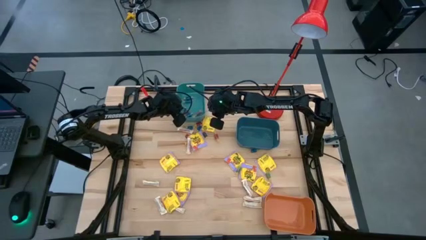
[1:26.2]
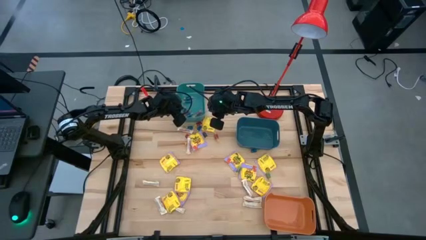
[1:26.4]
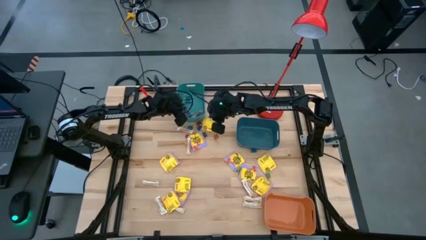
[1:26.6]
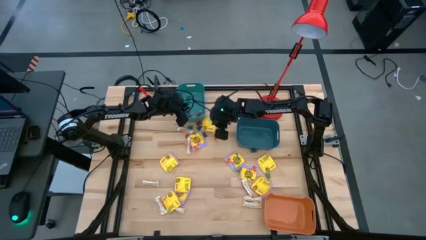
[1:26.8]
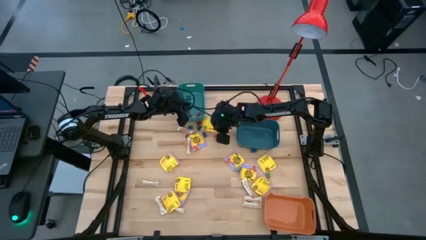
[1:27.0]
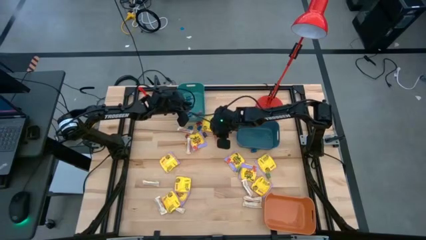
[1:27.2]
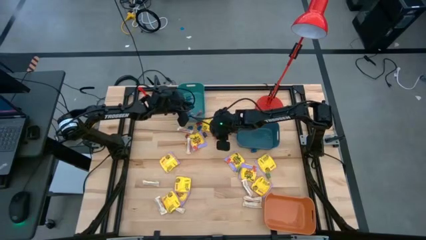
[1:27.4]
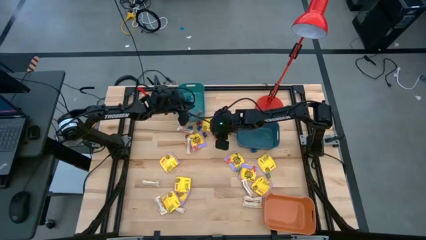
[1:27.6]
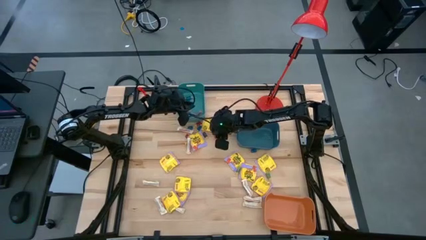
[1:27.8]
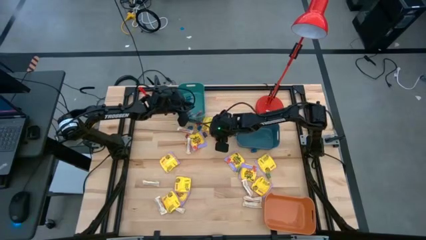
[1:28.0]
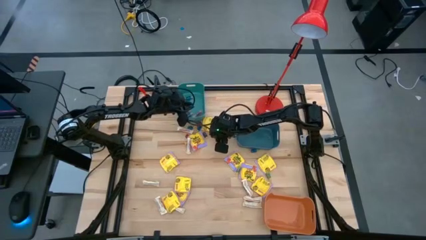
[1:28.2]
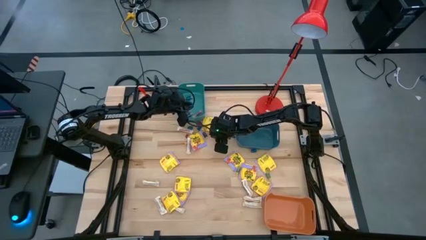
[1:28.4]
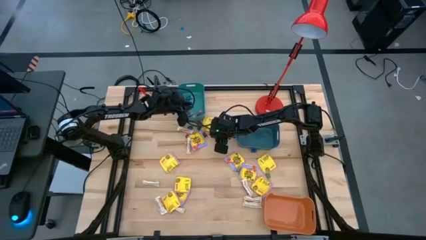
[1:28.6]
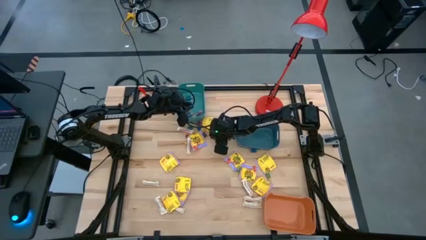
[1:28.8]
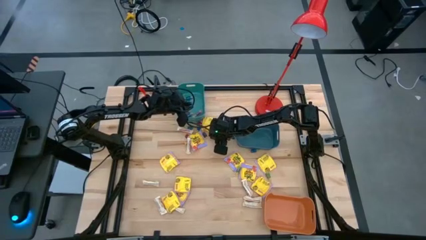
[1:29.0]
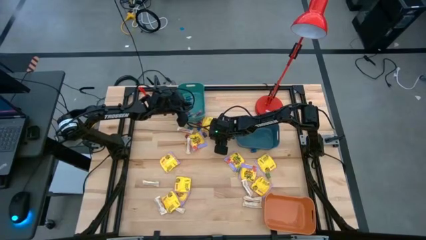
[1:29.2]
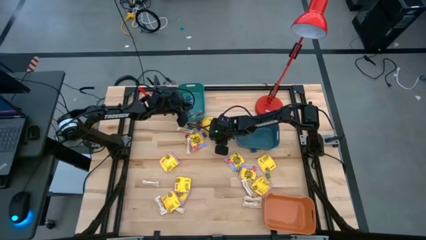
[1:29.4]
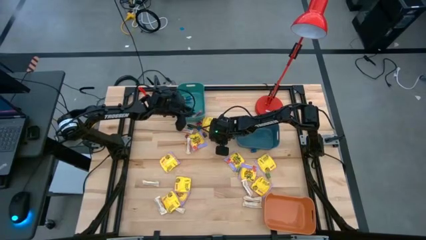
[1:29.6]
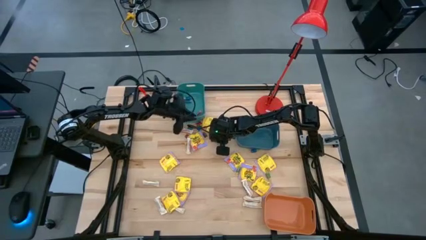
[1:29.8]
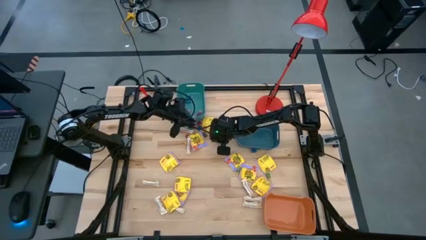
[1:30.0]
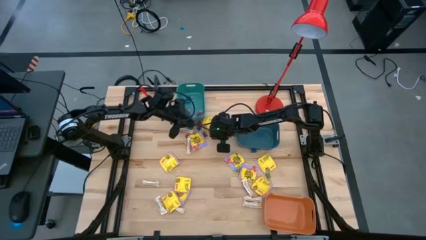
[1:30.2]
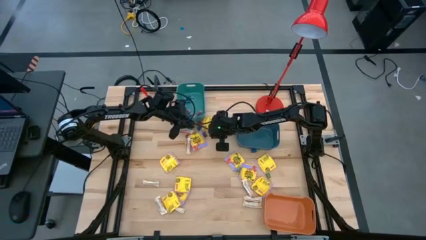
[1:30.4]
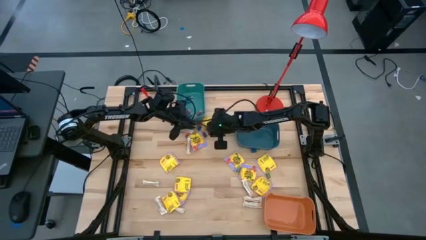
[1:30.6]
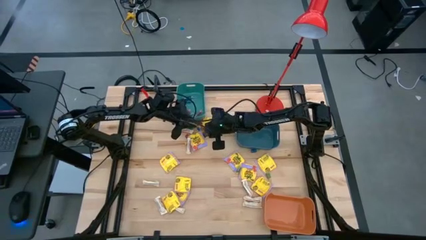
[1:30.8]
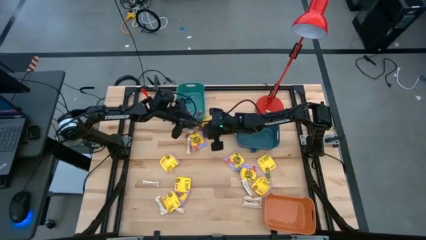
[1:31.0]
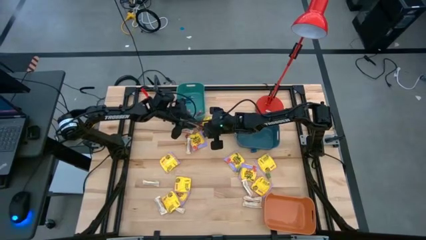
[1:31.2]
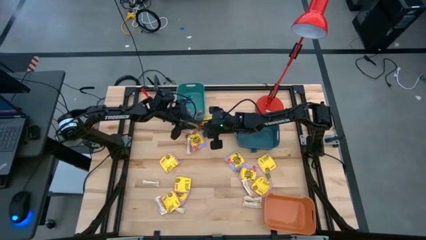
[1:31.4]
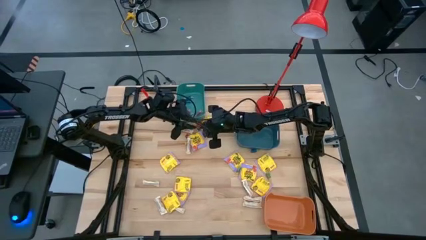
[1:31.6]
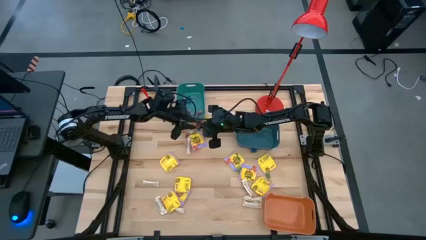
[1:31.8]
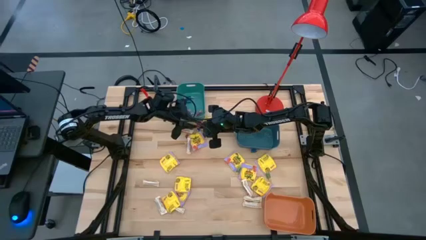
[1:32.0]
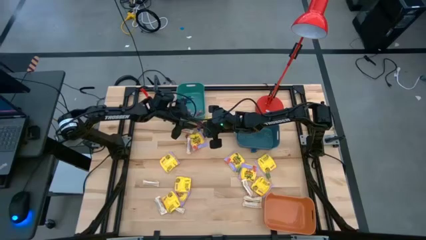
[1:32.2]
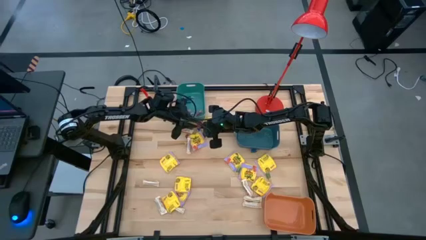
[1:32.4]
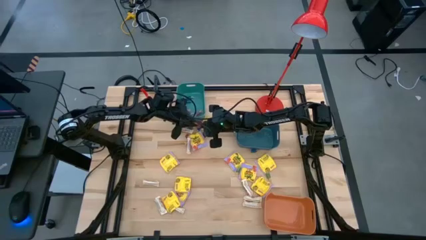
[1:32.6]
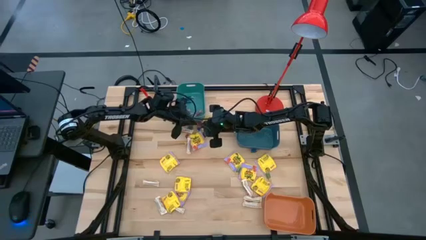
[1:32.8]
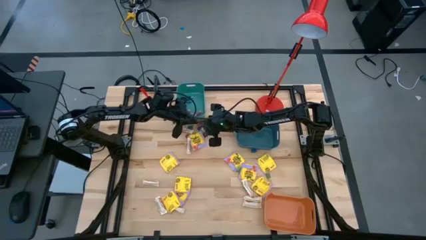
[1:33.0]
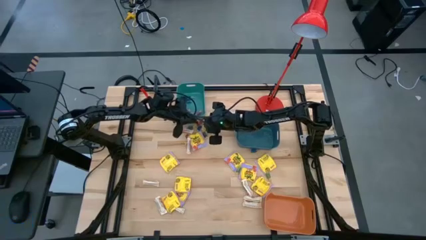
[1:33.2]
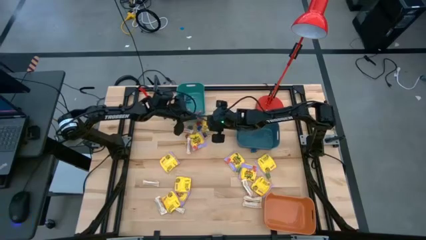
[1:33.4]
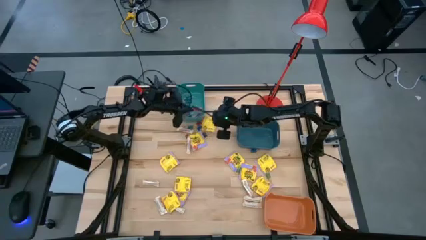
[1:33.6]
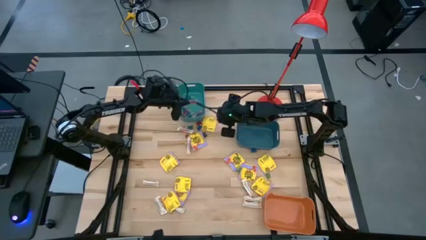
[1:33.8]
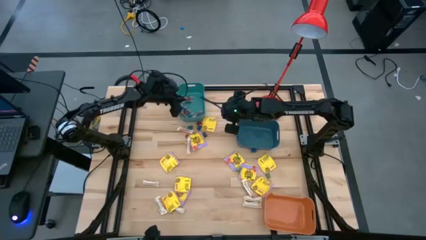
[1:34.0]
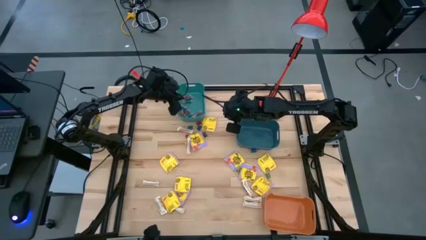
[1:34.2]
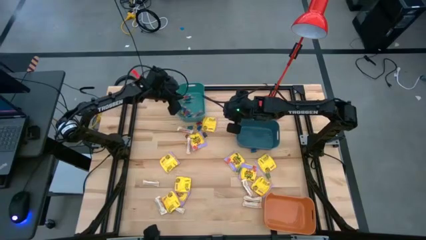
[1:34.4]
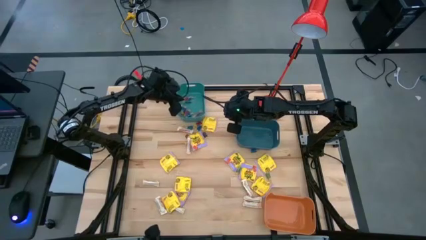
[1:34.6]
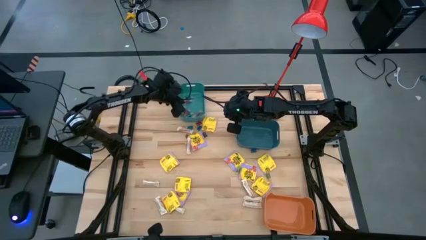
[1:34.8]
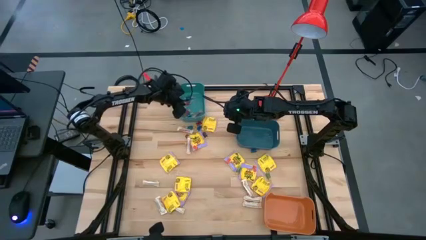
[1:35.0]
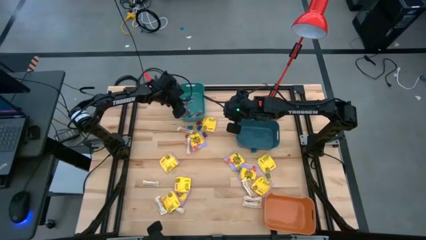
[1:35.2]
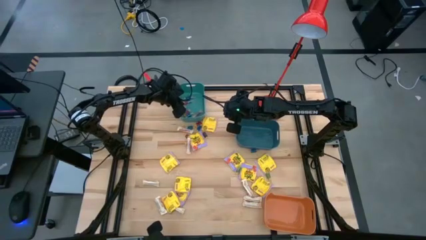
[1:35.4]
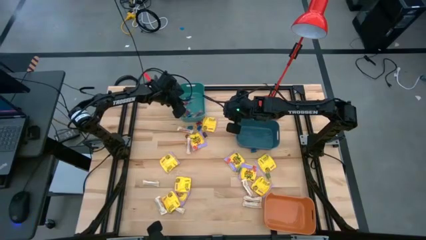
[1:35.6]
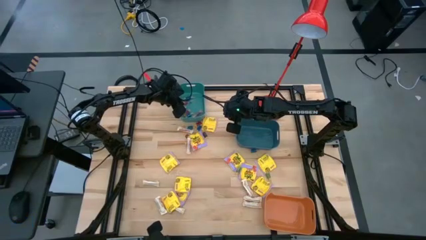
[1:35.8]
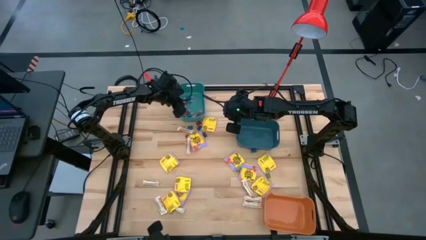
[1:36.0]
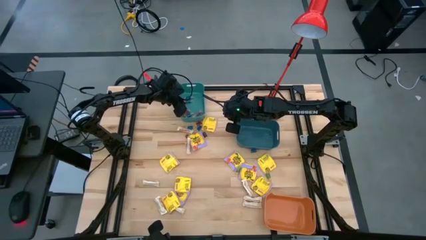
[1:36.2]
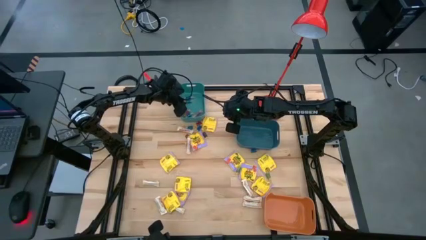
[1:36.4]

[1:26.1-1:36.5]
Task: Sort candy
Put the red candy into the green bin
